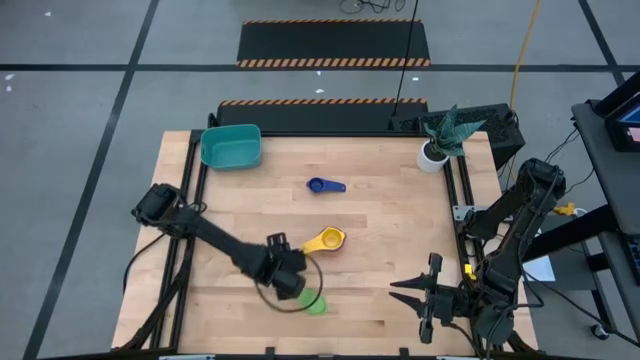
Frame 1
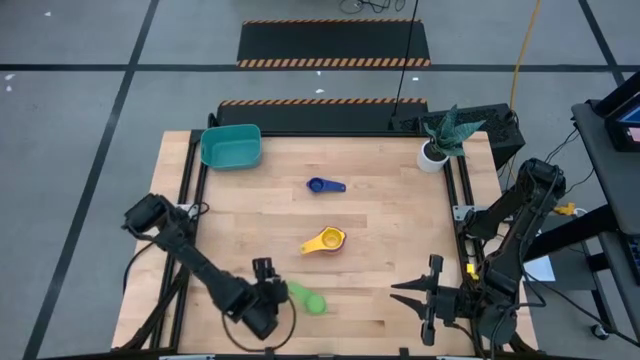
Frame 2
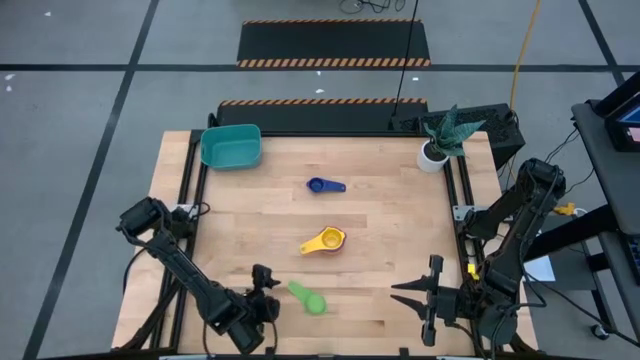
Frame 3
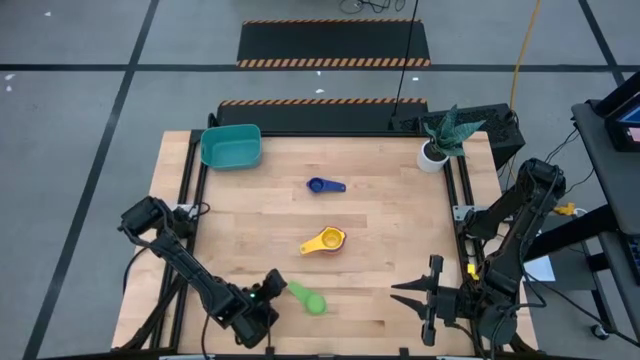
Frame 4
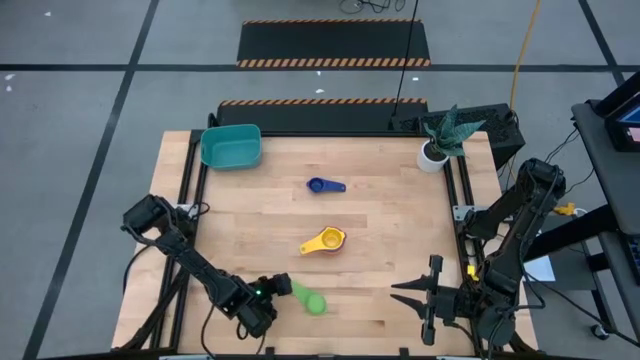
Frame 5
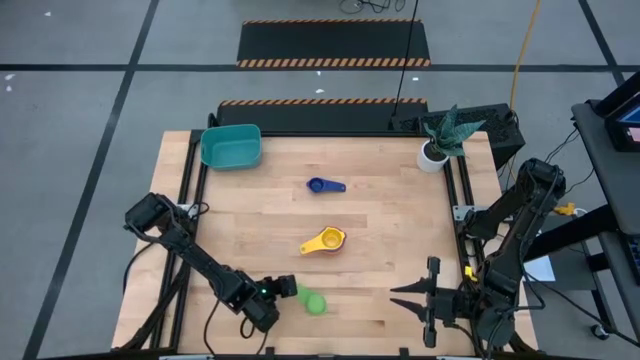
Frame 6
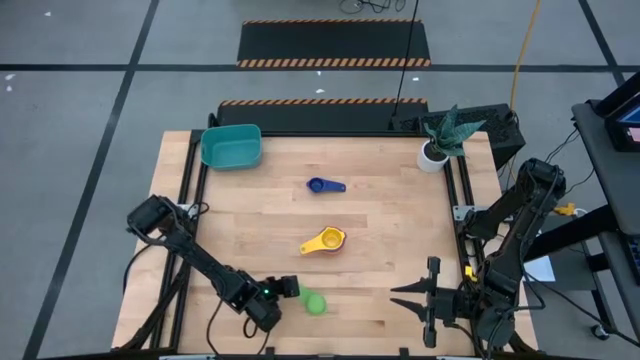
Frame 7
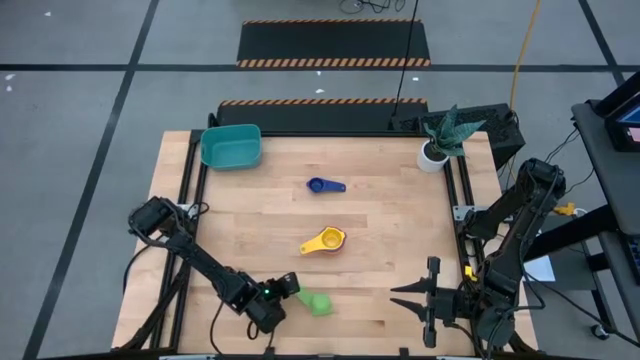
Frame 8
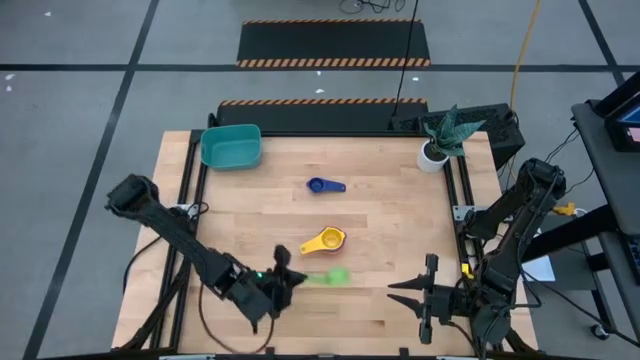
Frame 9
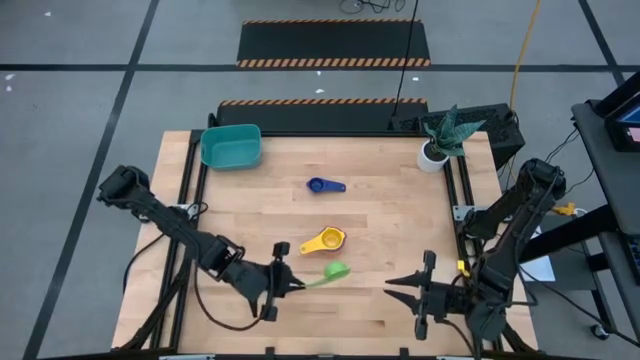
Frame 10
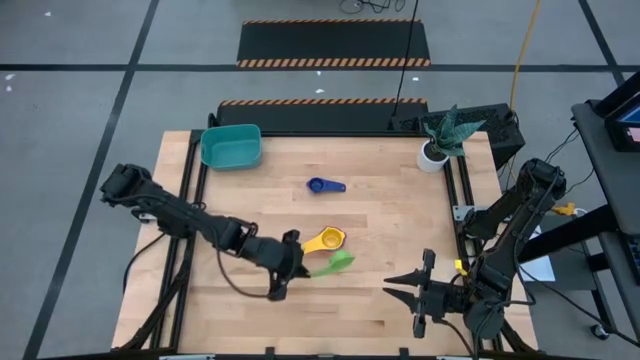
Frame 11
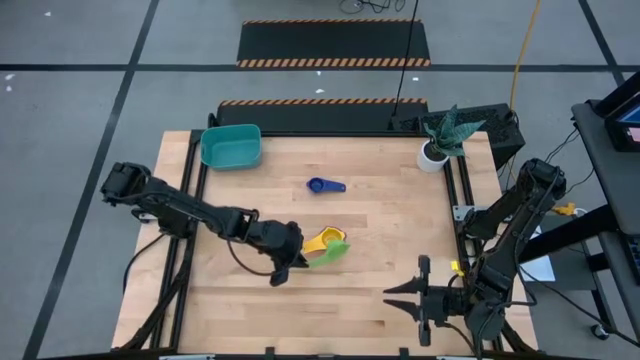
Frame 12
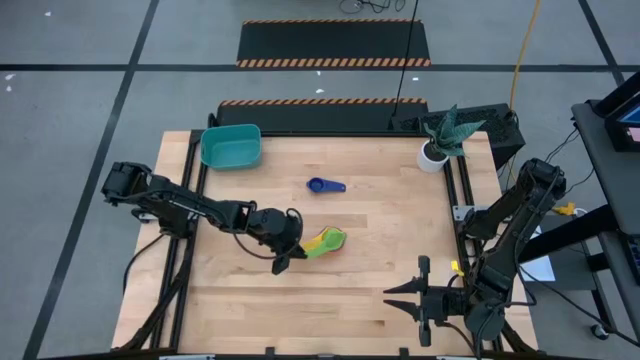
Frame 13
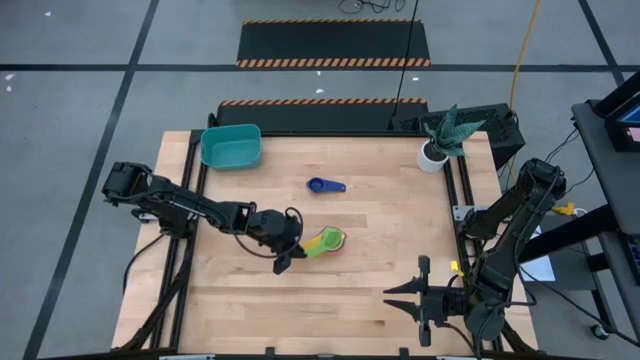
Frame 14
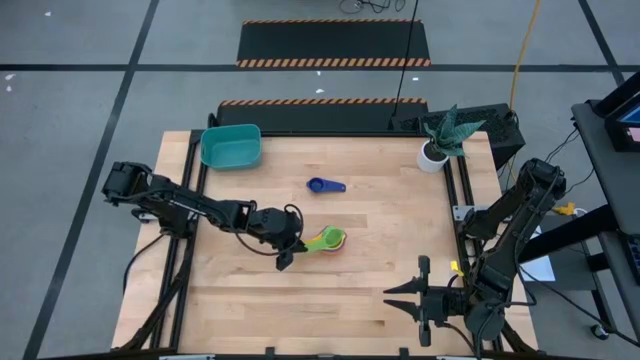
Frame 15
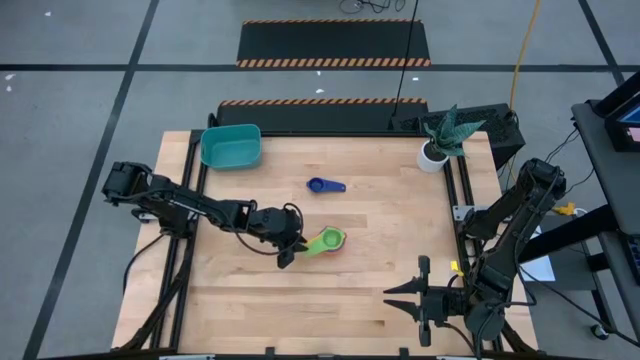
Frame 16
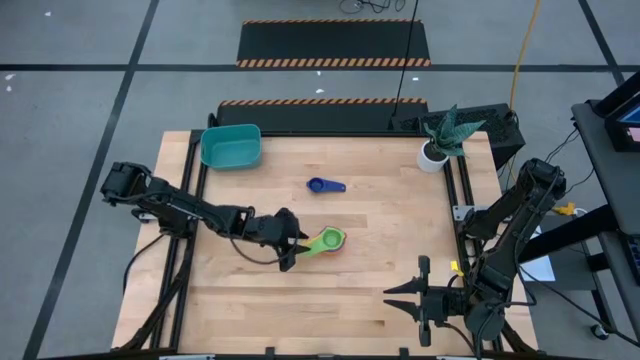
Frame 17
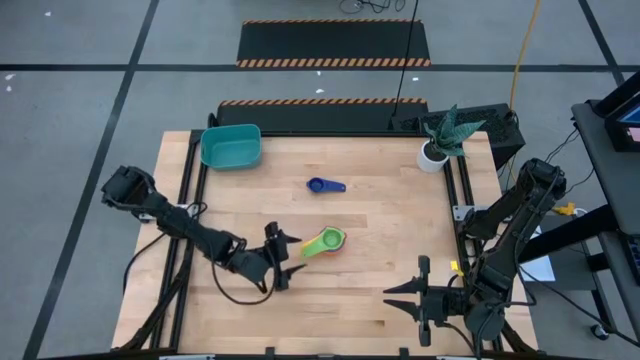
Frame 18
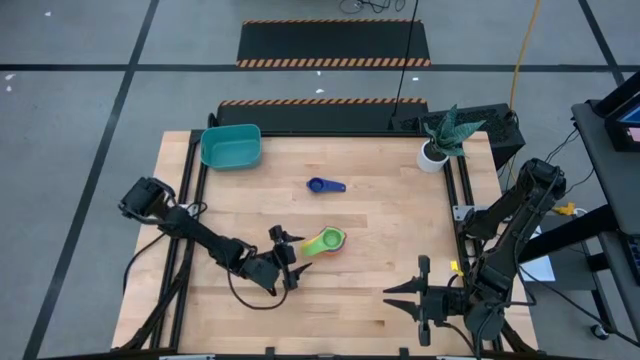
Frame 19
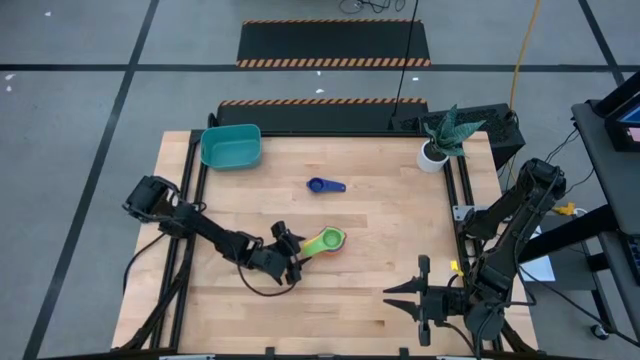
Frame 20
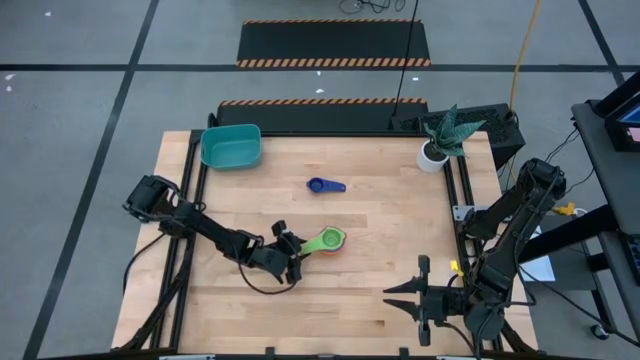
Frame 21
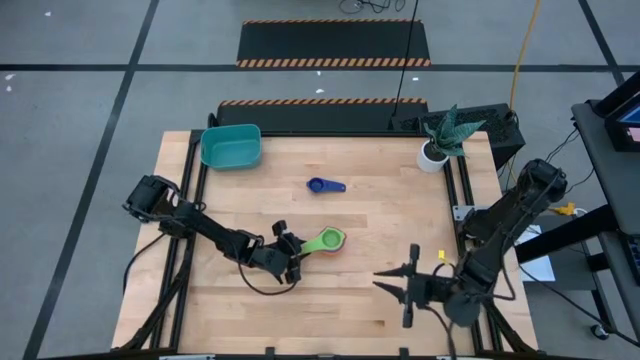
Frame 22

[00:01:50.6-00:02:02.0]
Task: Nest measuring cups in basket
Stack the green measuring cup on top of the yellow measuring cup

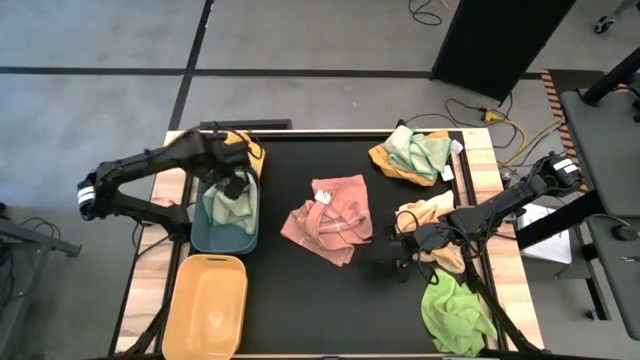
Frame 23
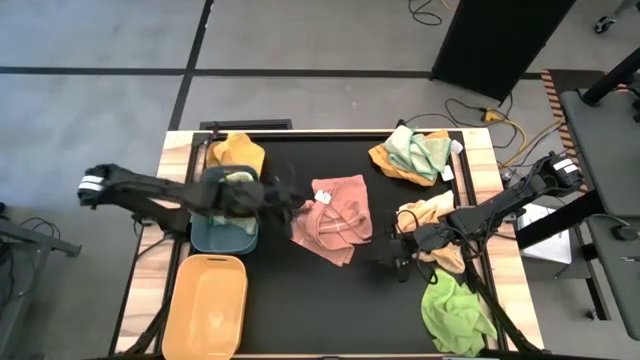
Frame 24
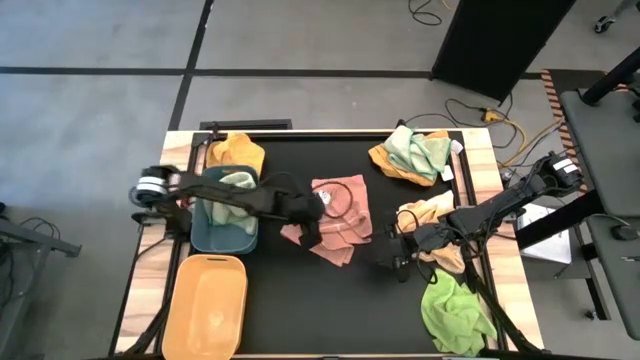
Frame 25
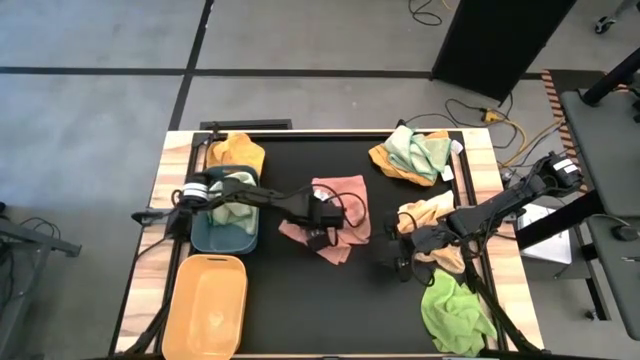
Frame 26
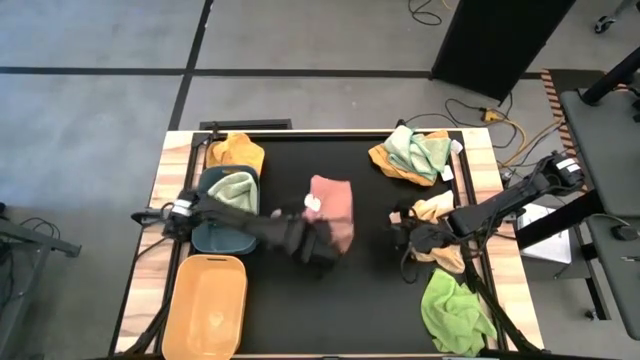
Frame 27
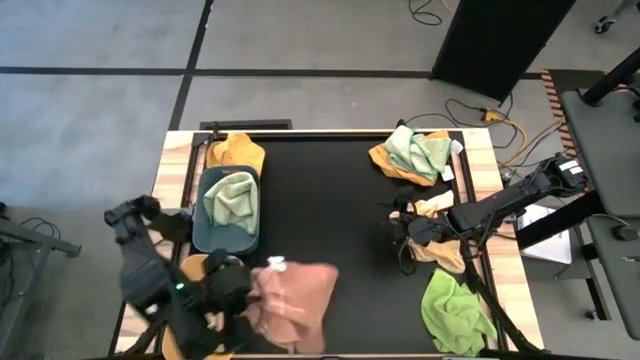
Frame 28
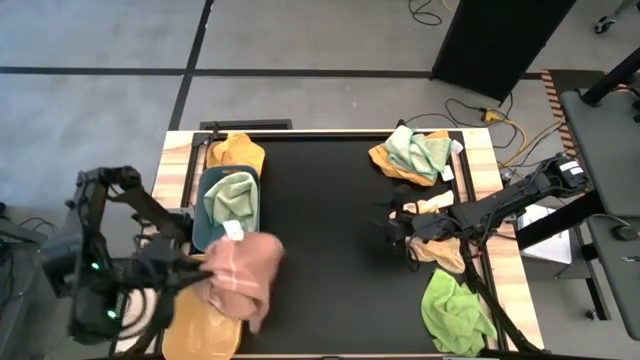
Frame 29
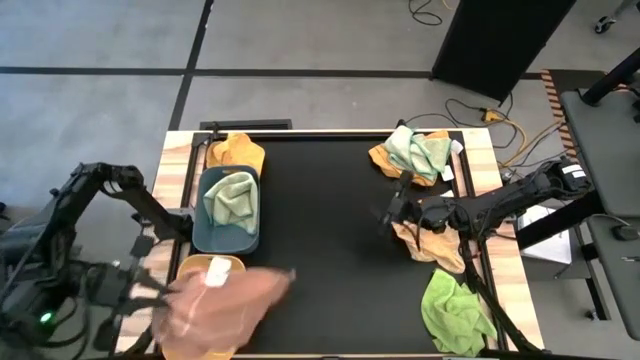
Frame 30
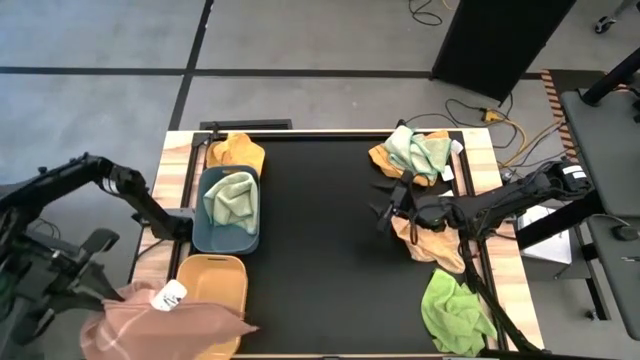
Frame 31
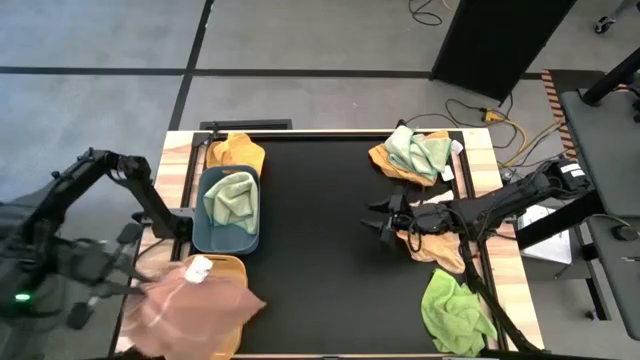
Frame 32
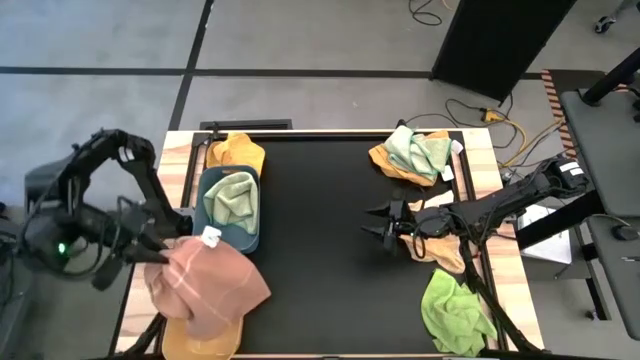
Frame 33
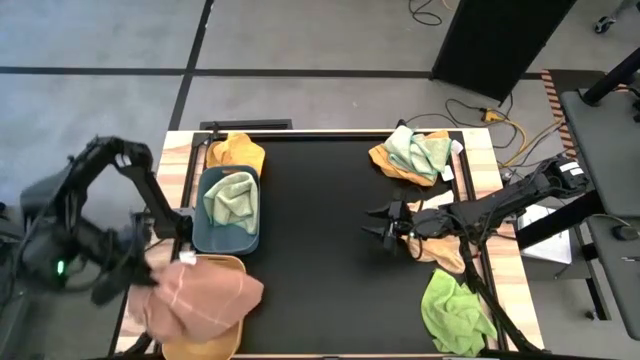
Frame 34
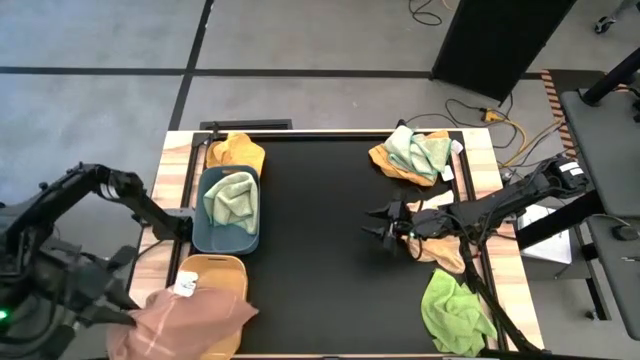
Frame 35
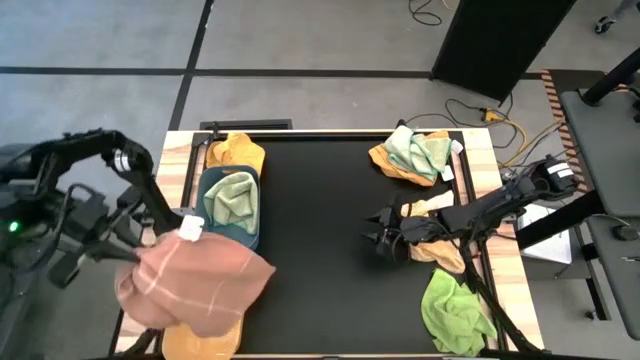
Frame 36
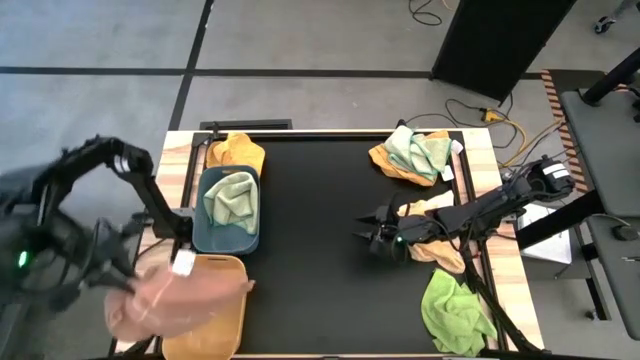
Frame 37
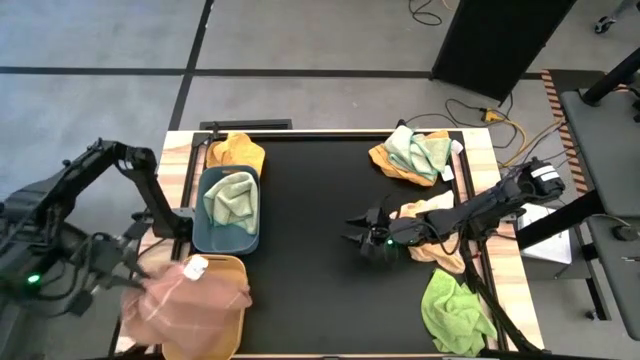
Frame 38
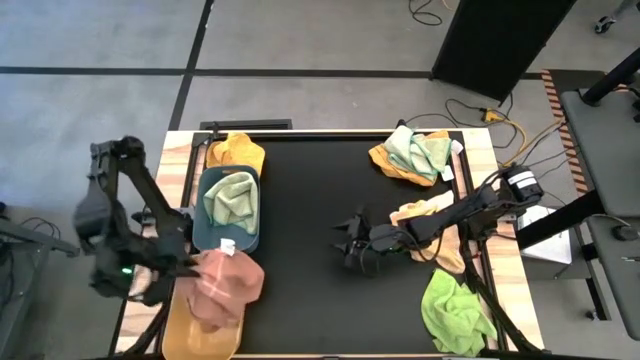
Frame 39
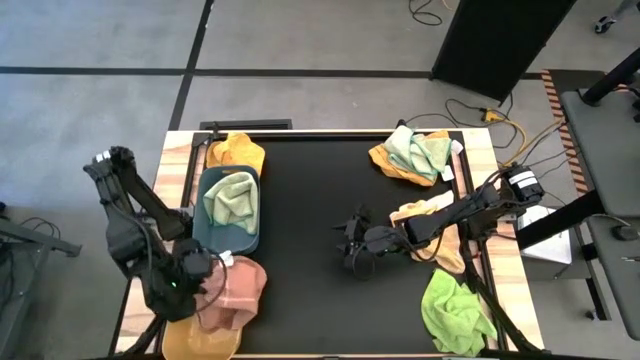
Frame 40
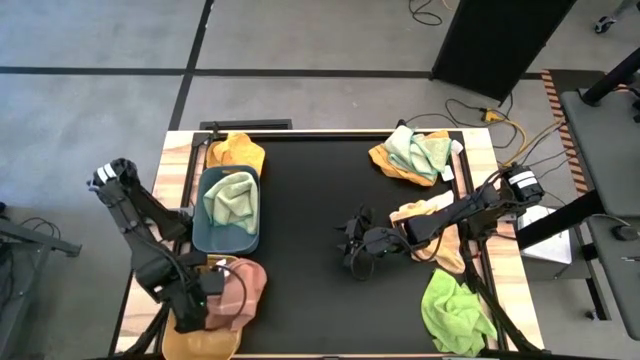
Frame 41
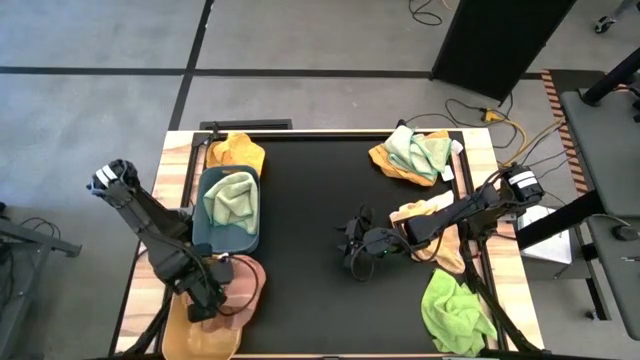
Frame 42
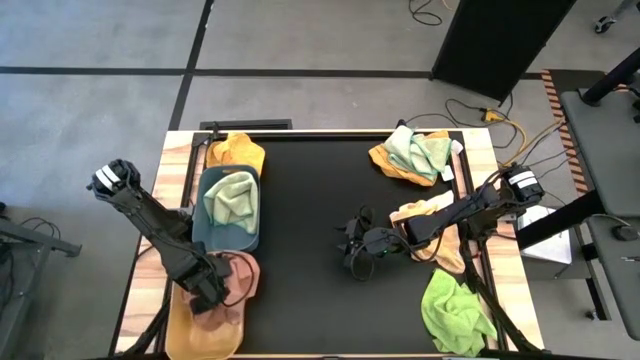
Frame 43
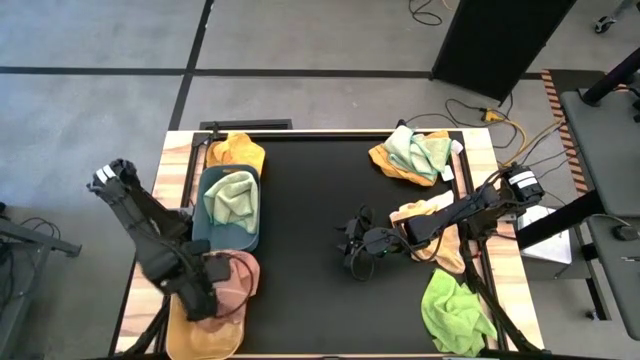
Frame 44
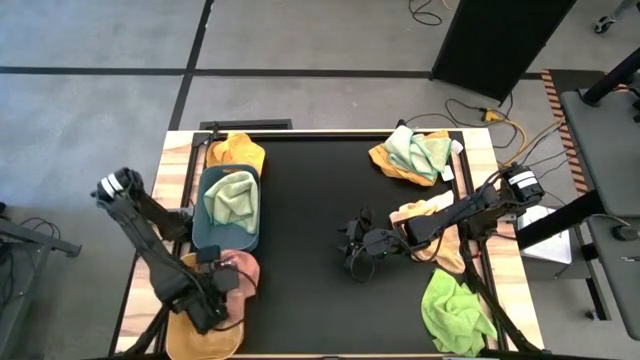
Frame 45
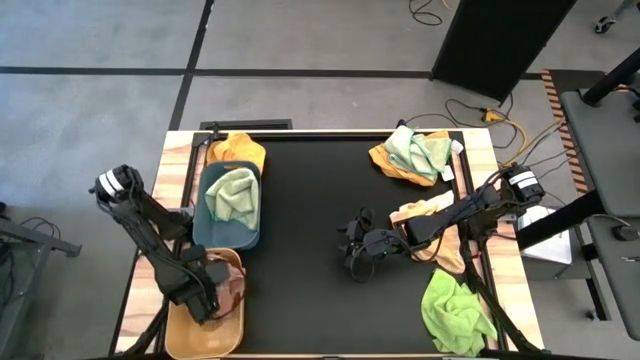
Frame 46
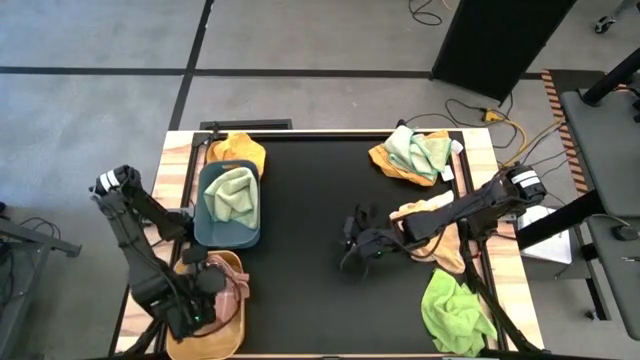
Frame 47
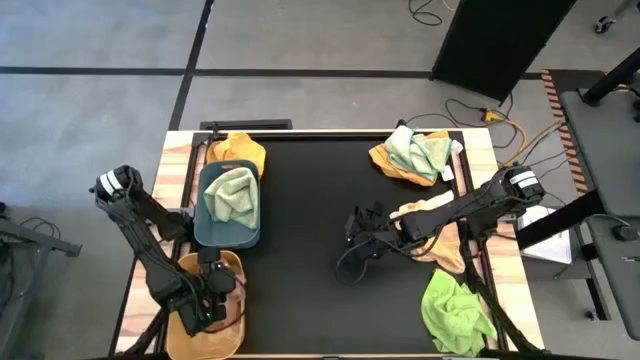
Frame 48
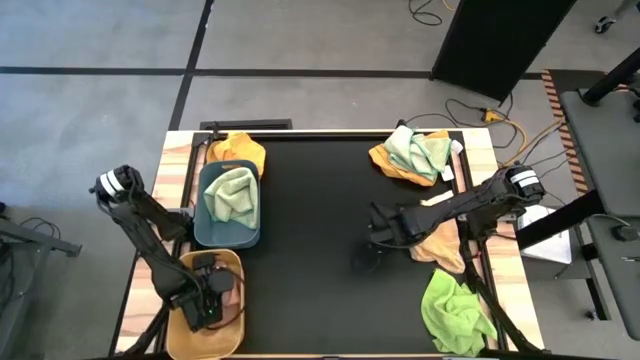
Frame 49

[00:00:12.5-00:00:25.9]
Task: Sort towels by color in basket
Put the pink kitchen towel into the yellow bin
